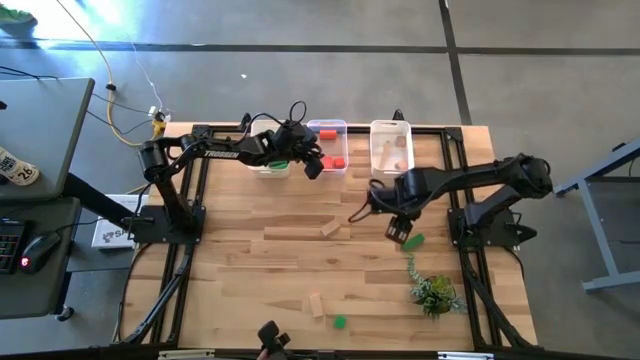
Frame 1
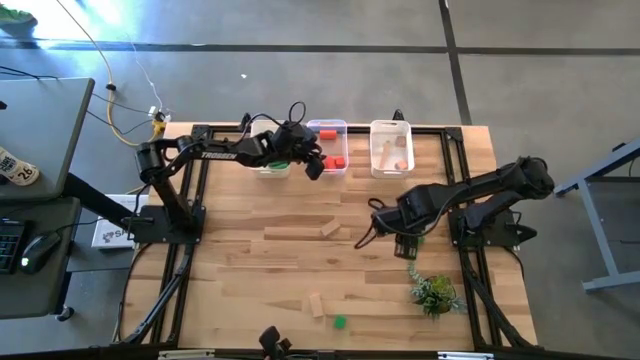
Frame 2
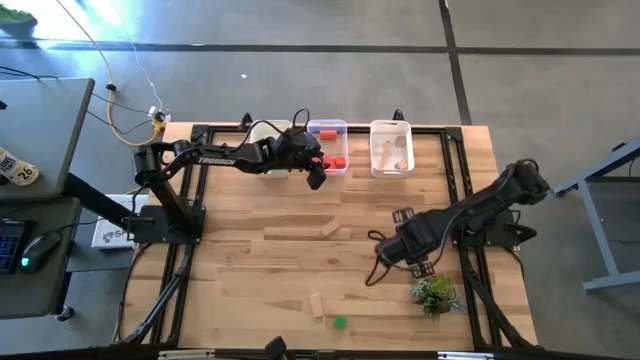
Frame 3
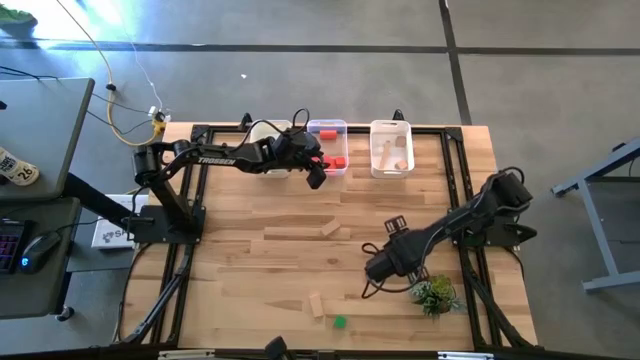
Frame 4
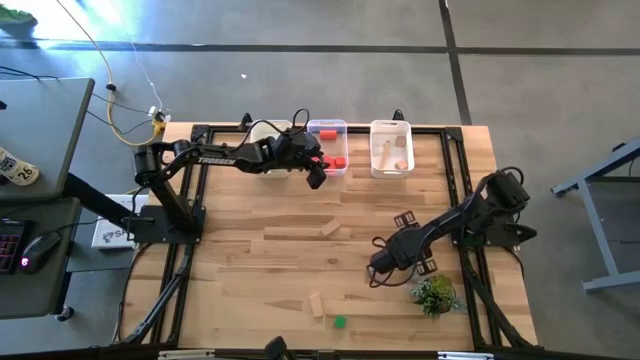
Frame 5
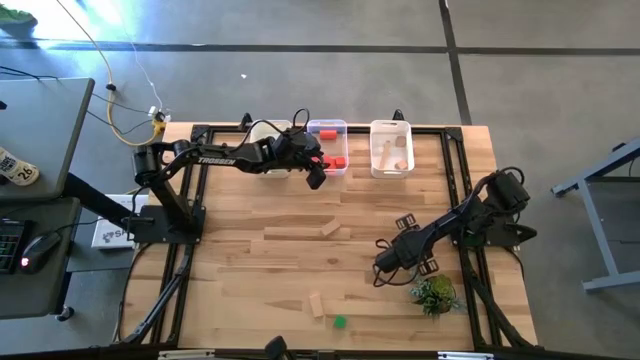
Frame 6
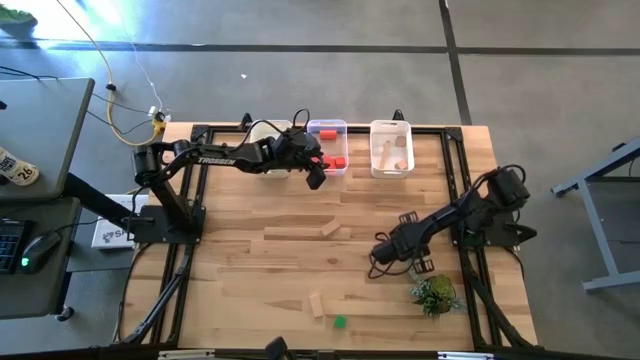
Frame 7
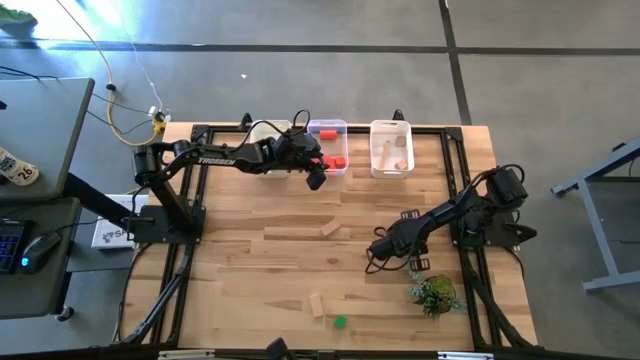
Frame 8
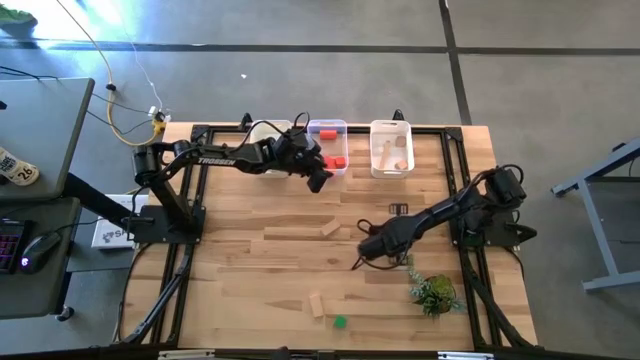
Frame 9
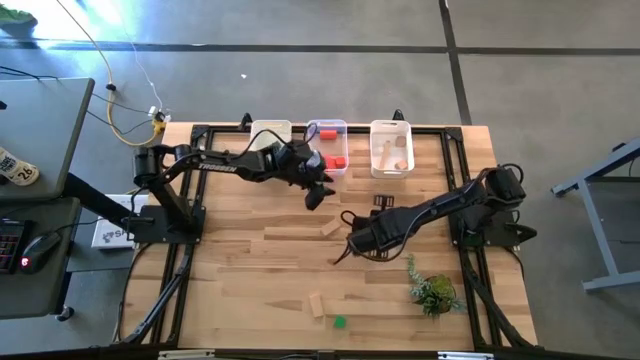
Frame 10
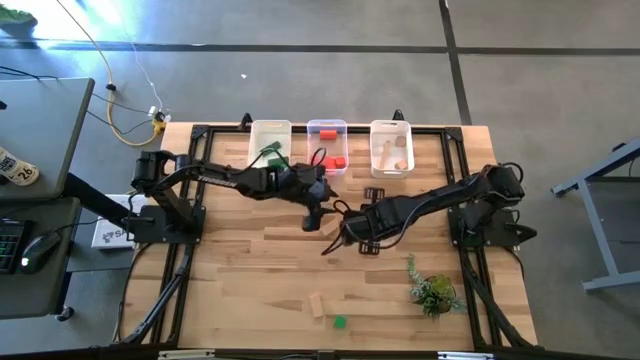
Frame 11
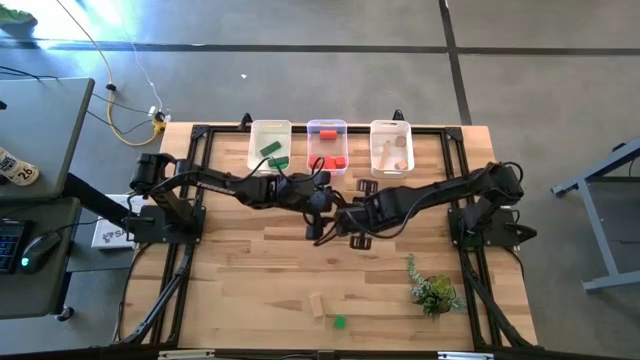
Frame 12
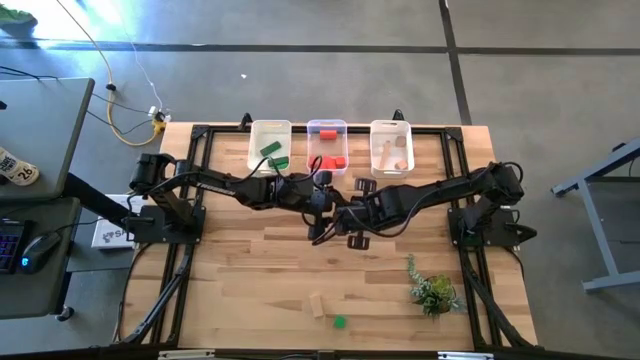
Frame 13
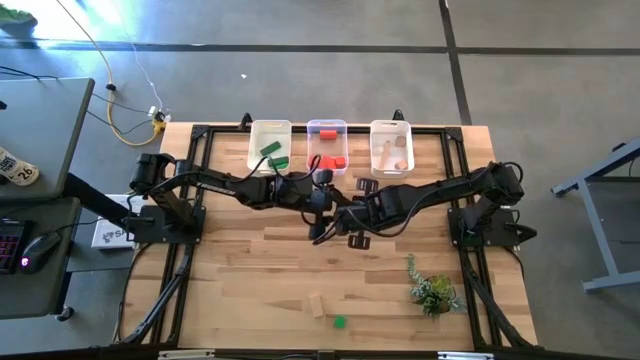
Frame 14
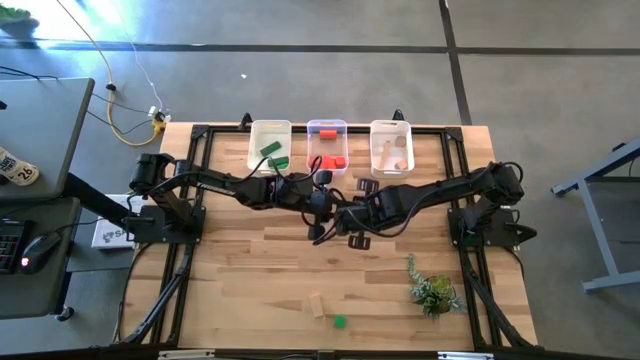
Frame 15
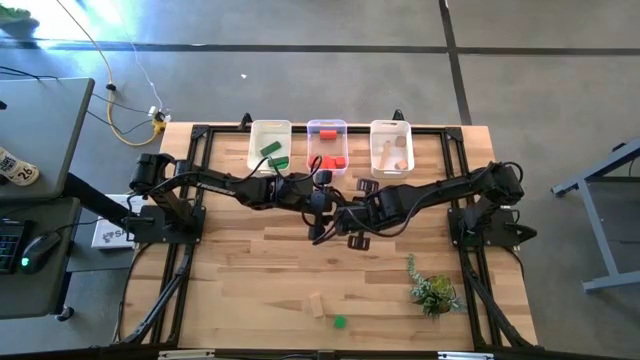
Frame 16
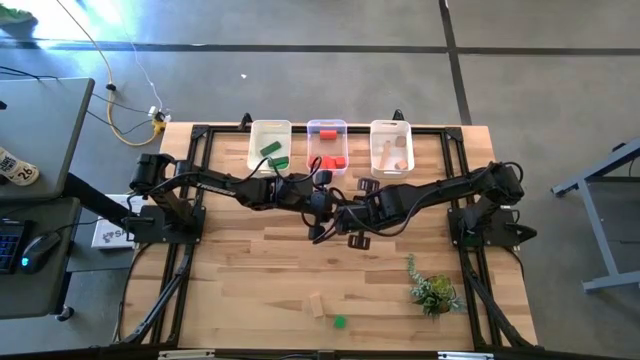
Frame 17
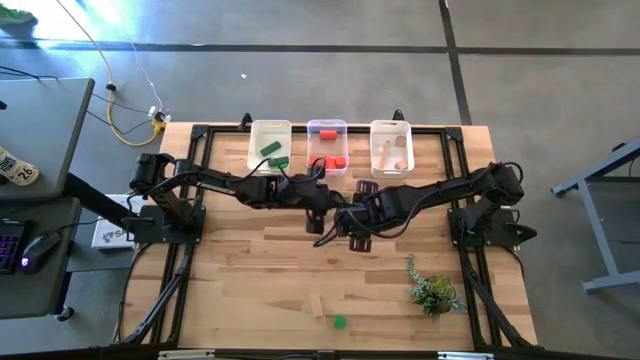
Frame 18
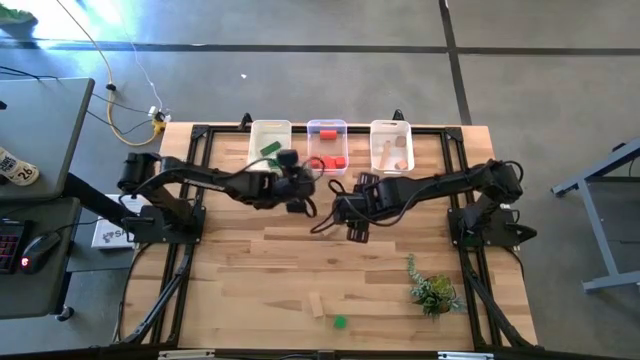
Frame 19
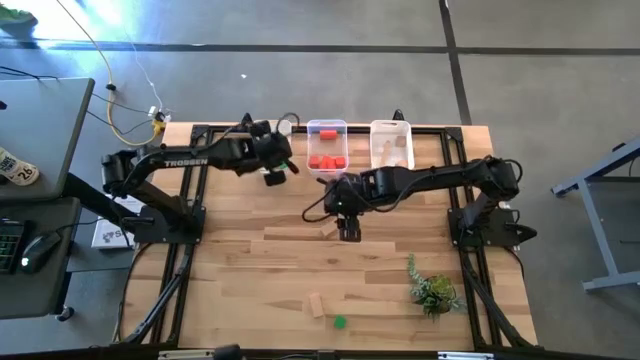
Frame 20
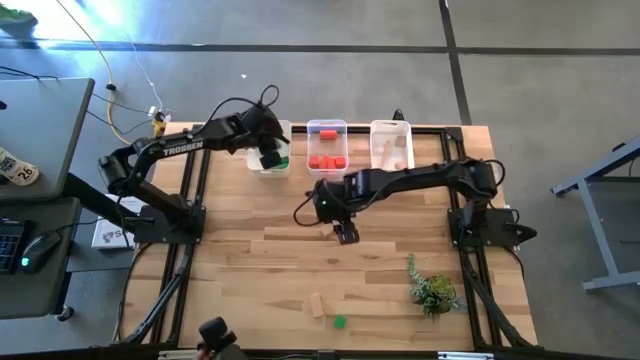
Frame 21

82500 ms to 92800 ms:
Task: Sort & place blocks by color
Put the green block into the left white bin

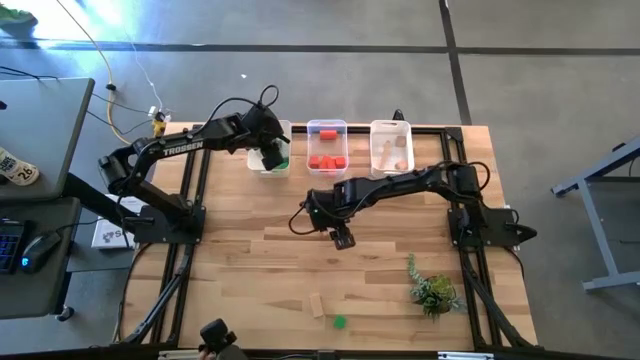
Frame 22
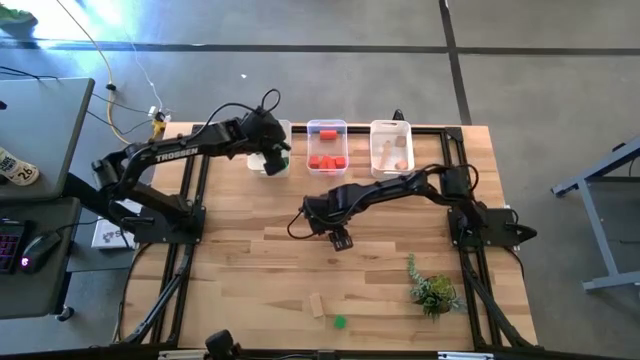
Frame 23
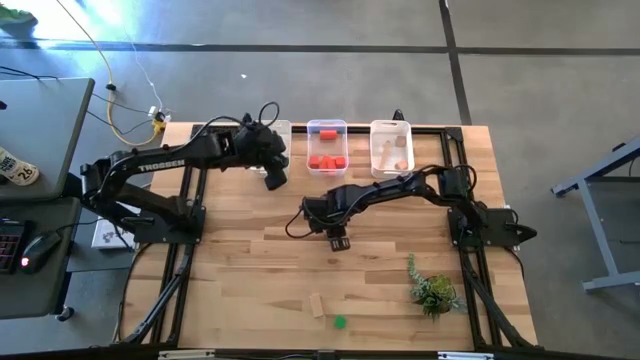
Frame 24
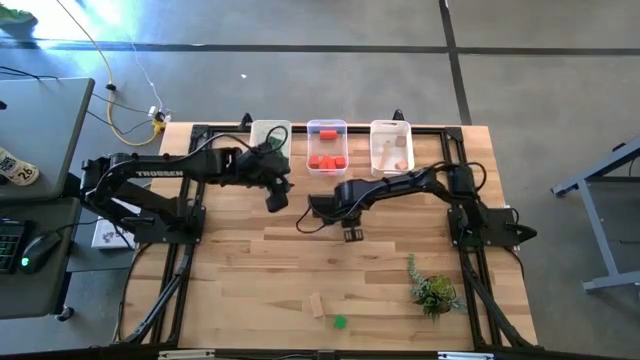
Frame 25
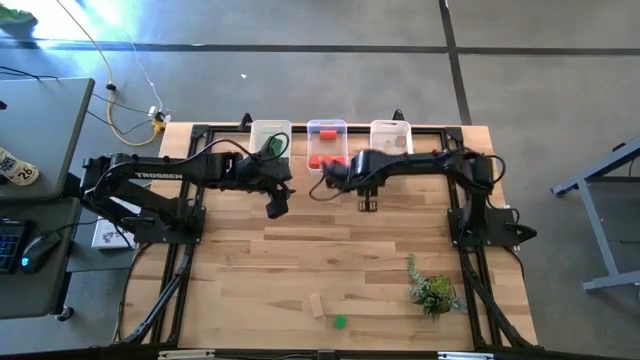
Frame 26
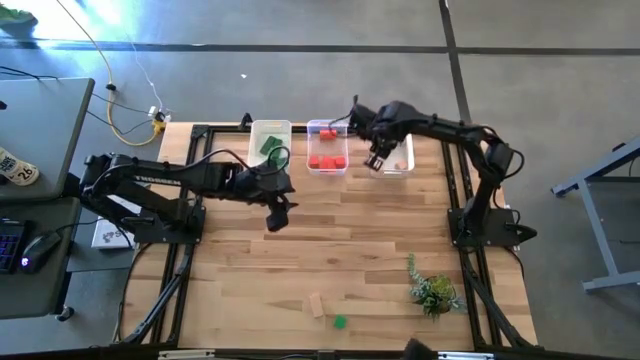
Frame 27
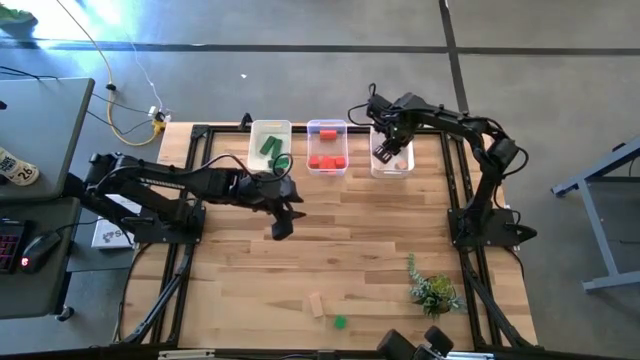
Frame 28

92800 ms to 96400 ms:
Put the brown block into the right white bin

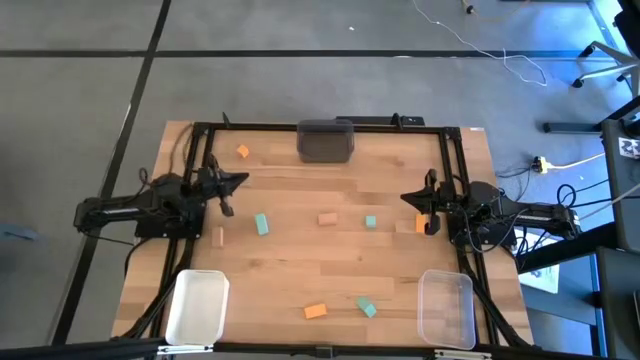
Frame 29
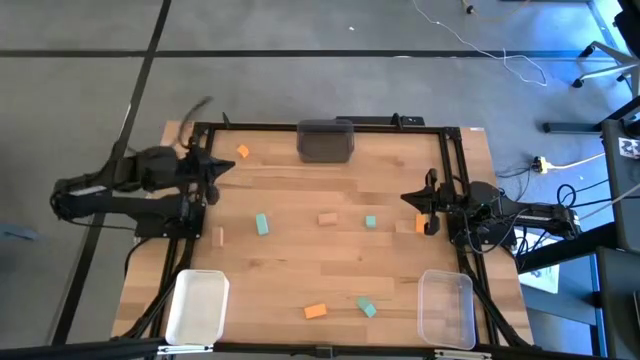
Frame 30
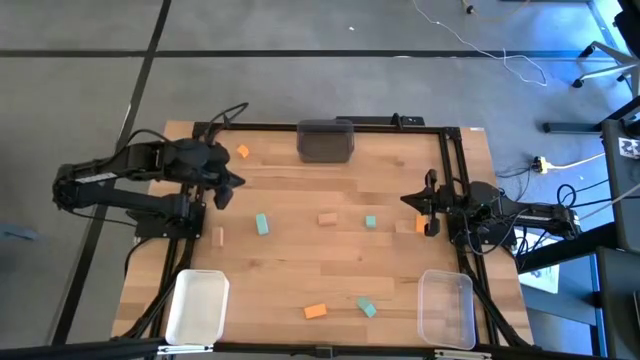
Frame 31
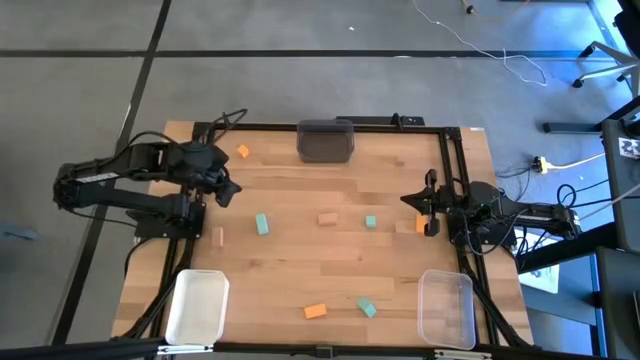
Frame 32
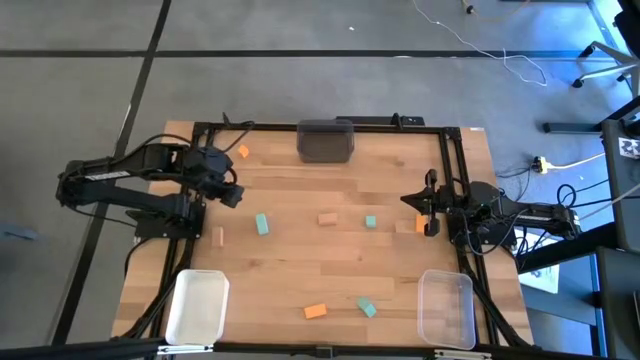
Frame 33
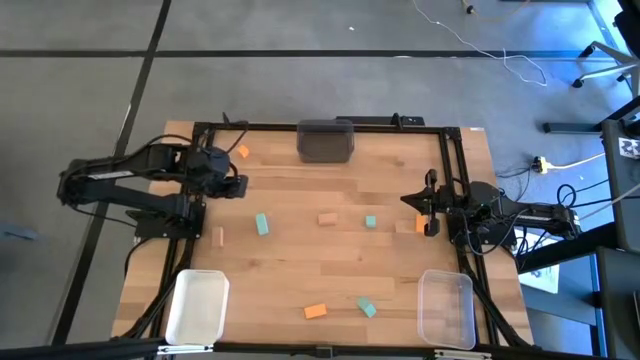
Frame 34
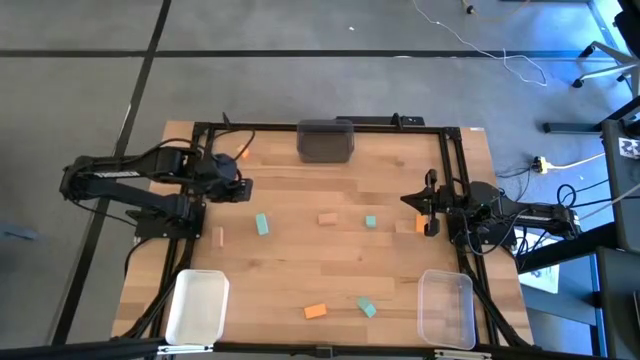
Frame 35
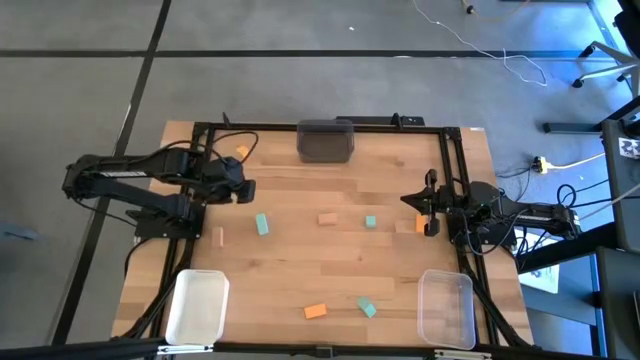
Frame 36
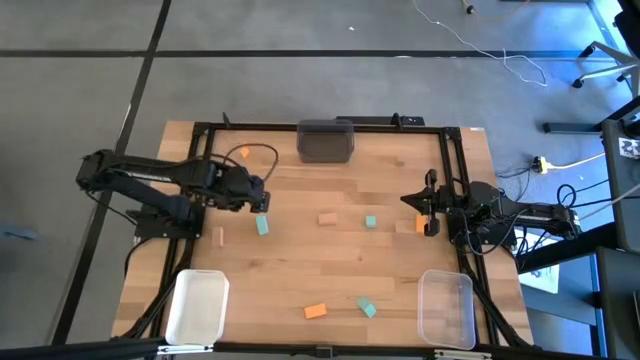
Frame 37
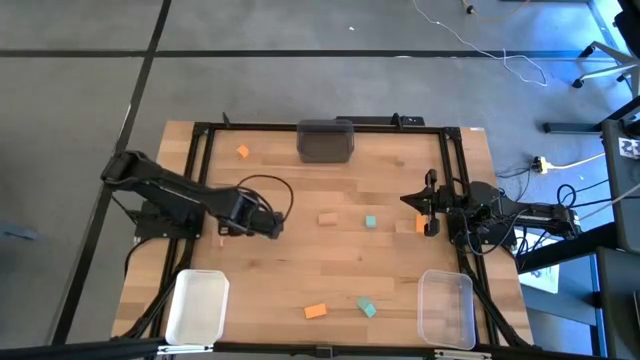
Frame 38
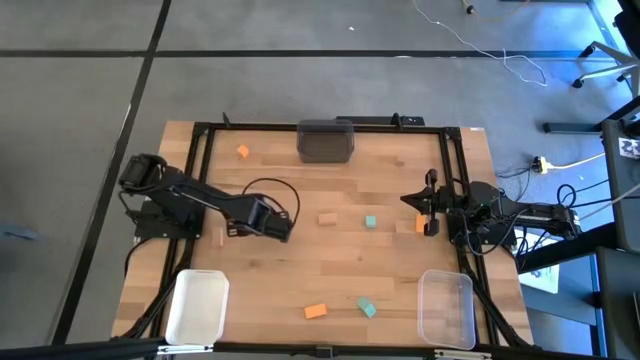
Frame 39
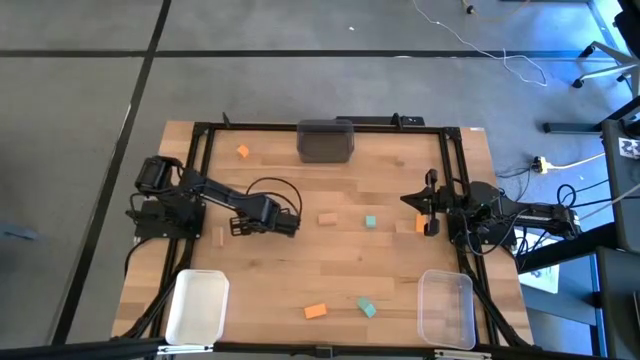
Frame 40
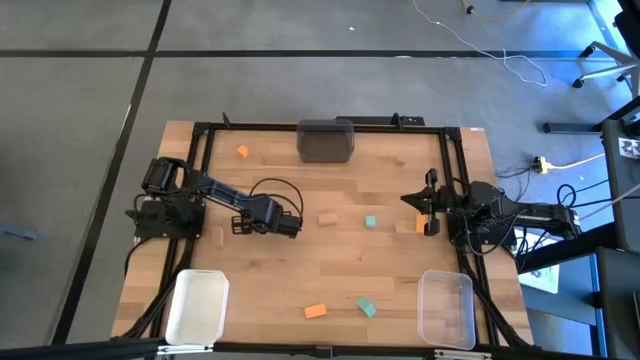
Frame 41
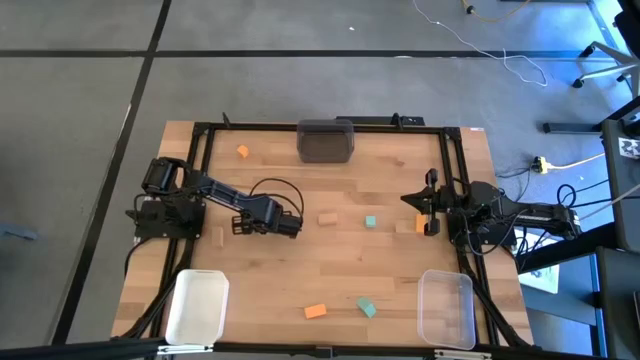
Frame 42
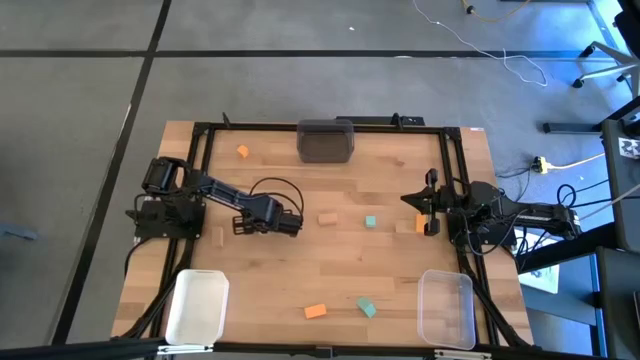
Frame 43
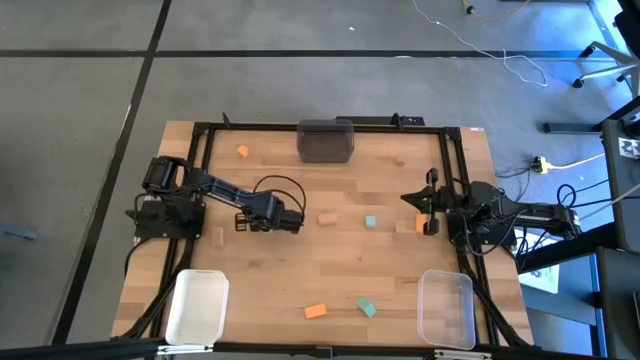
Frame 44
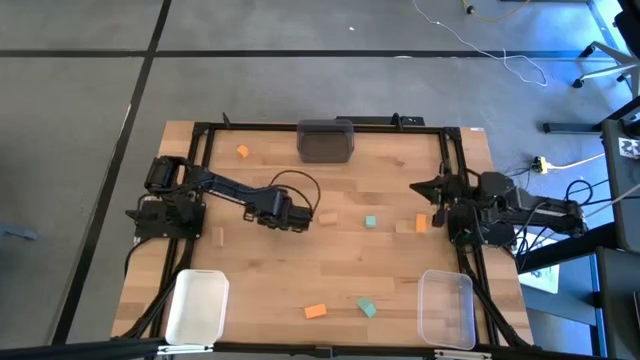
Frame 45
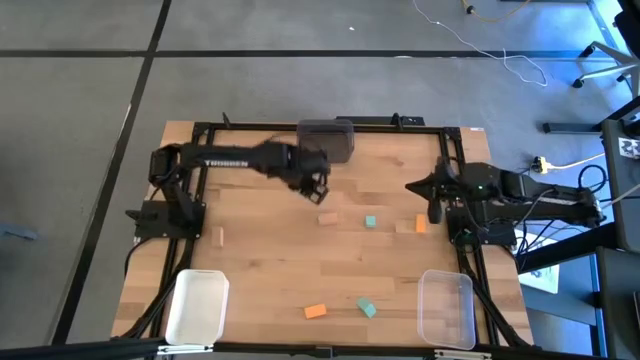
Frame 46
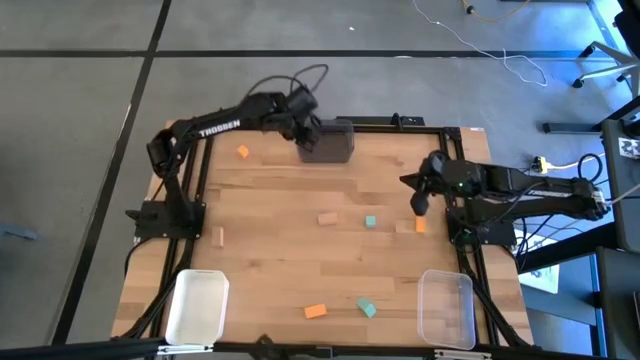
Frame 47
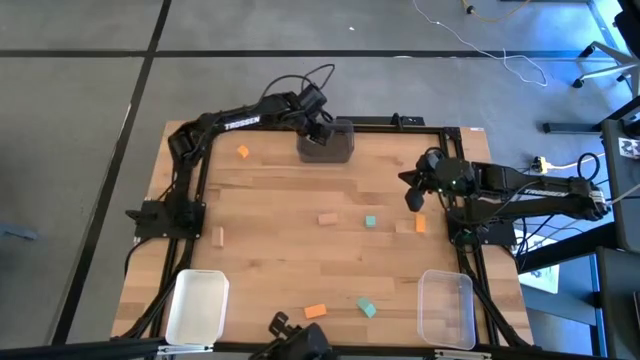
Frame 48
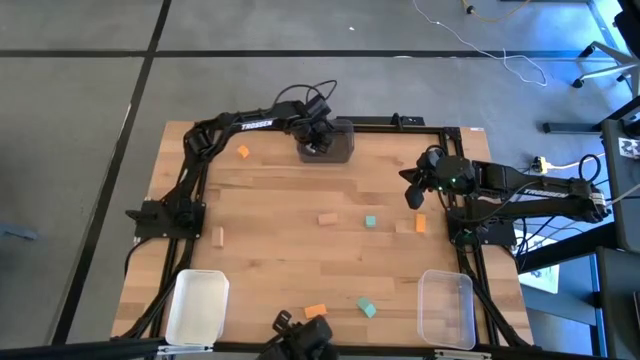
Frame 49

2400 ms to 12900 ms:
Task: Sort & place blocks by color
Put the top left blue block into the black bin
